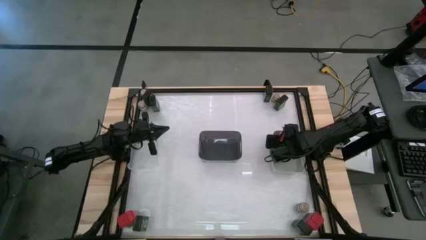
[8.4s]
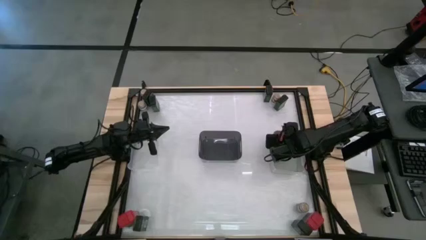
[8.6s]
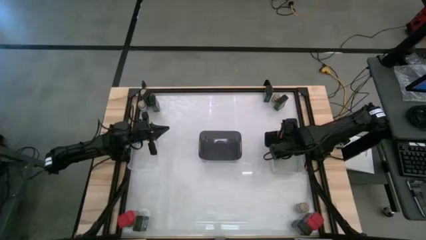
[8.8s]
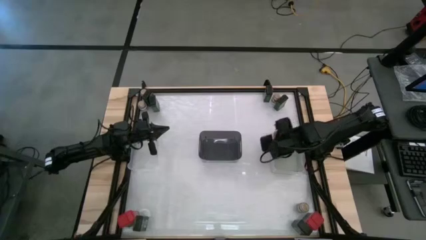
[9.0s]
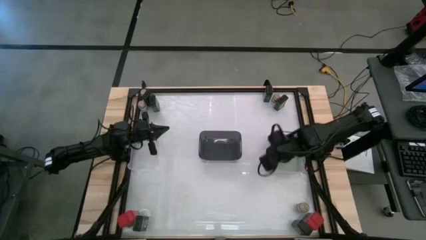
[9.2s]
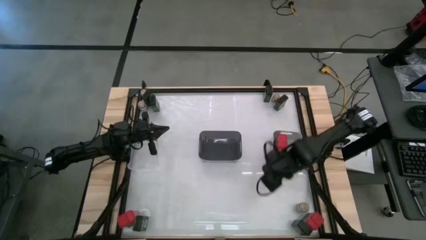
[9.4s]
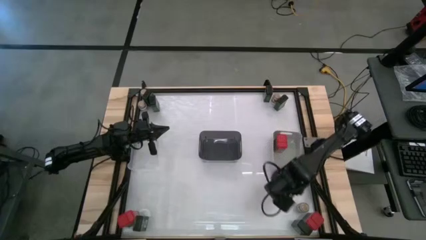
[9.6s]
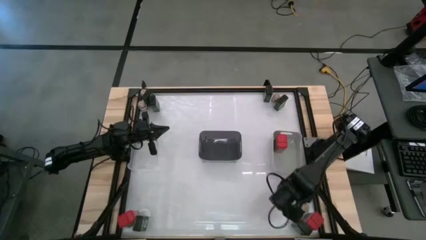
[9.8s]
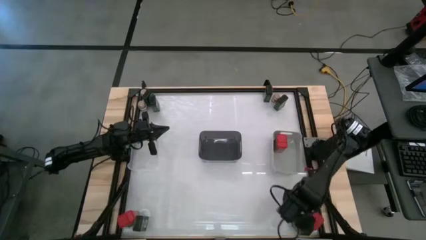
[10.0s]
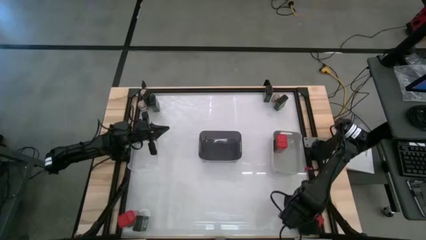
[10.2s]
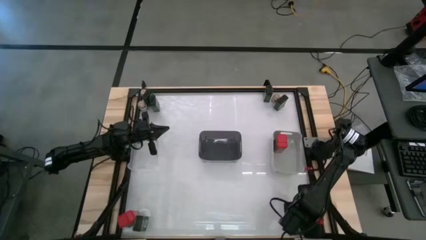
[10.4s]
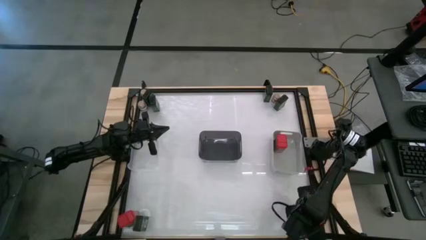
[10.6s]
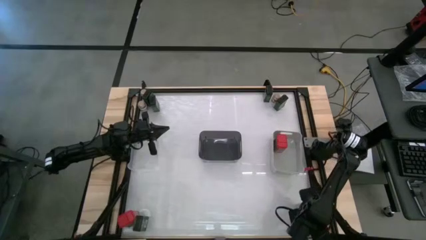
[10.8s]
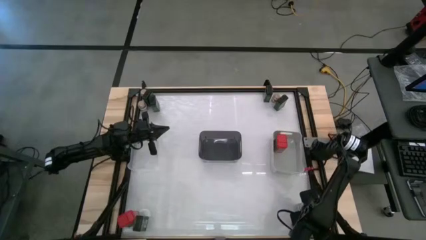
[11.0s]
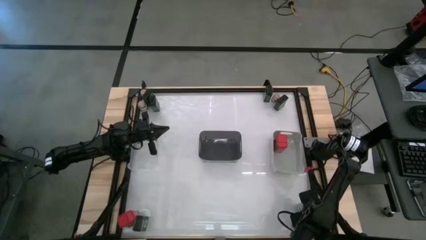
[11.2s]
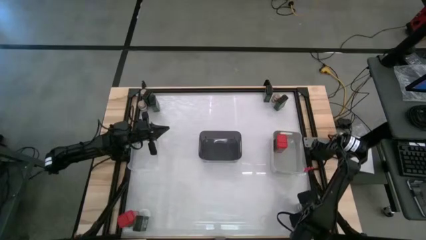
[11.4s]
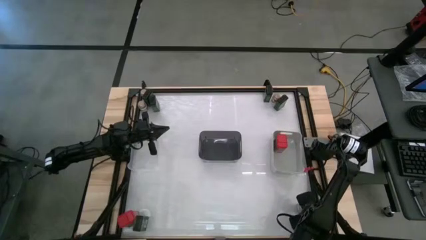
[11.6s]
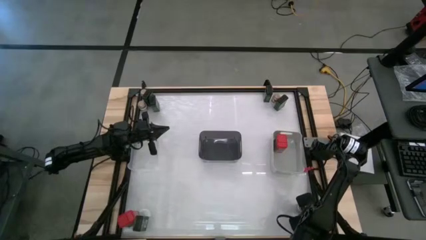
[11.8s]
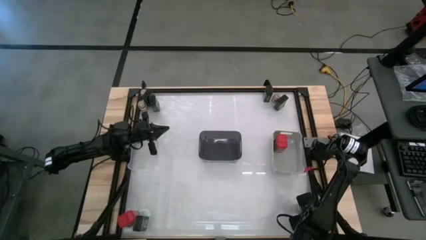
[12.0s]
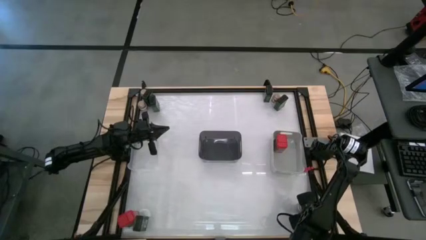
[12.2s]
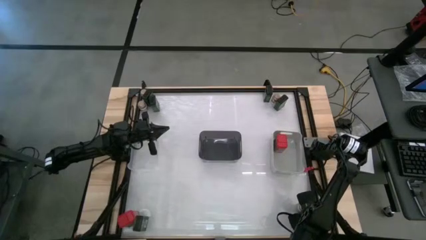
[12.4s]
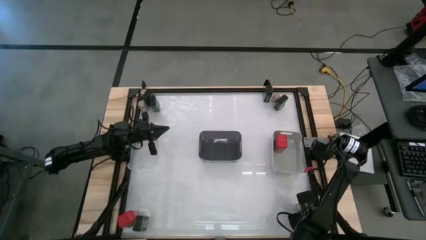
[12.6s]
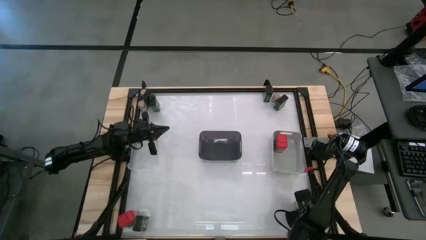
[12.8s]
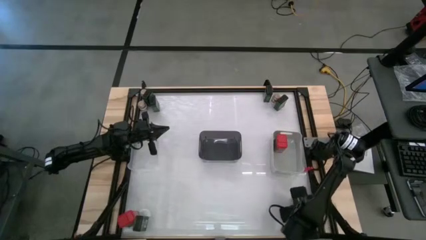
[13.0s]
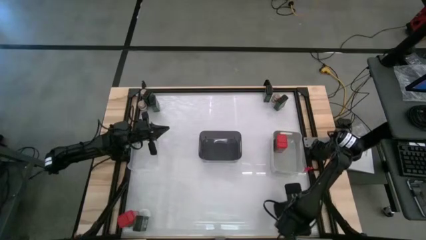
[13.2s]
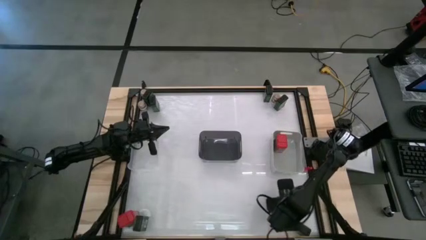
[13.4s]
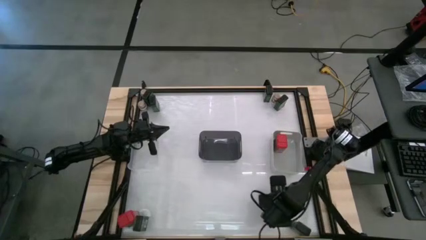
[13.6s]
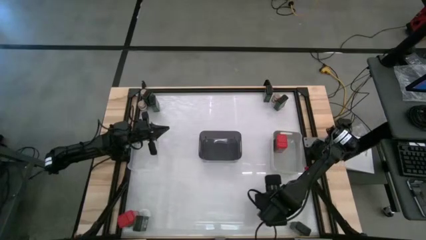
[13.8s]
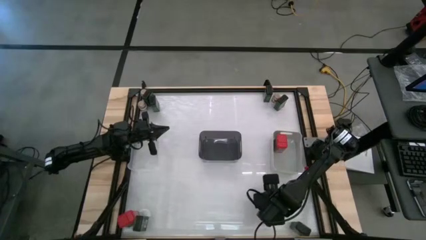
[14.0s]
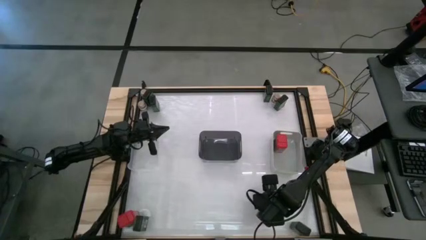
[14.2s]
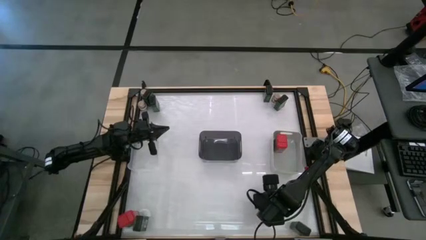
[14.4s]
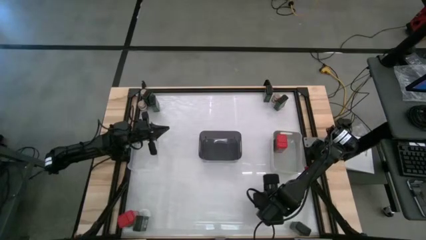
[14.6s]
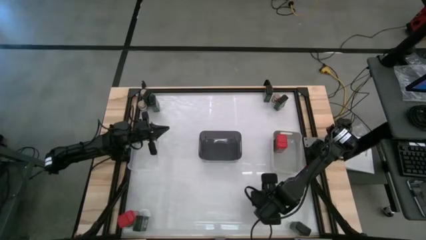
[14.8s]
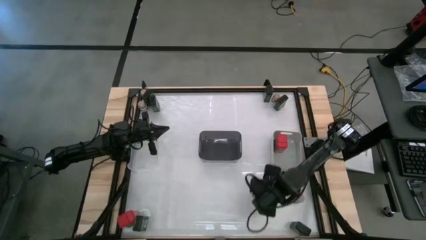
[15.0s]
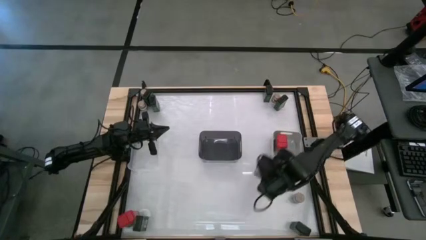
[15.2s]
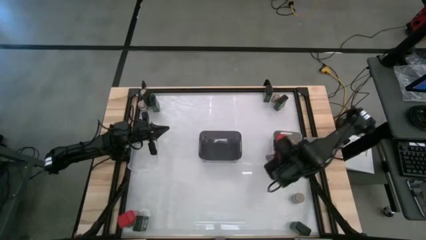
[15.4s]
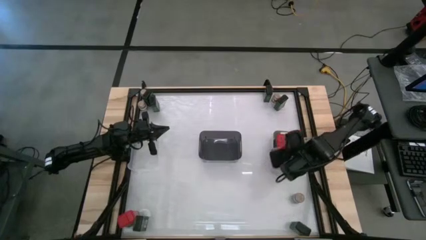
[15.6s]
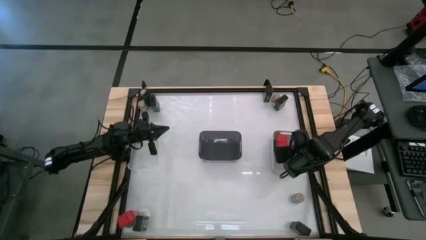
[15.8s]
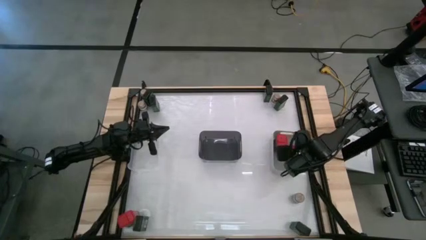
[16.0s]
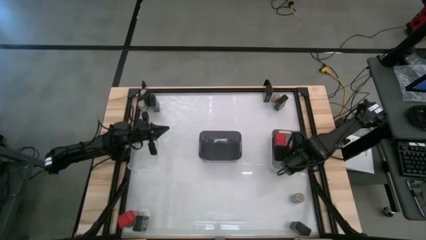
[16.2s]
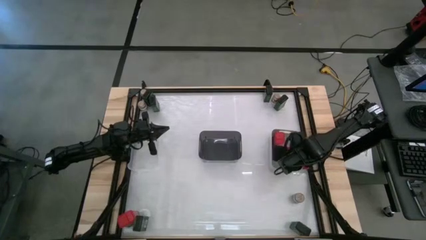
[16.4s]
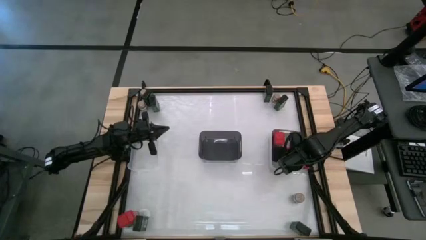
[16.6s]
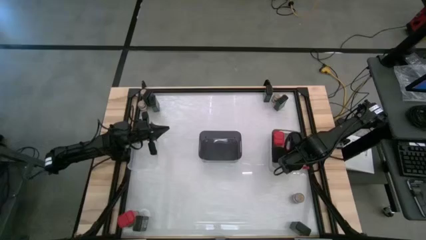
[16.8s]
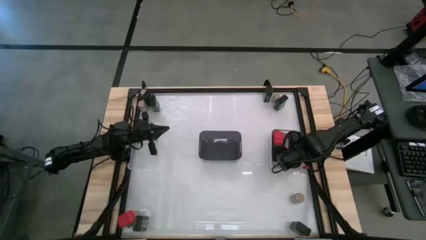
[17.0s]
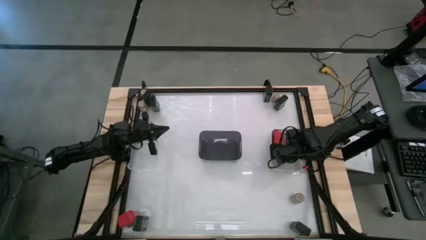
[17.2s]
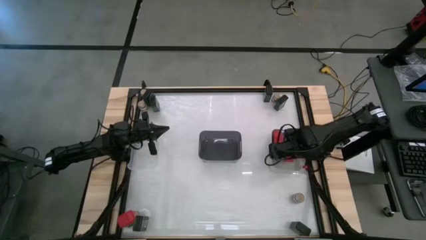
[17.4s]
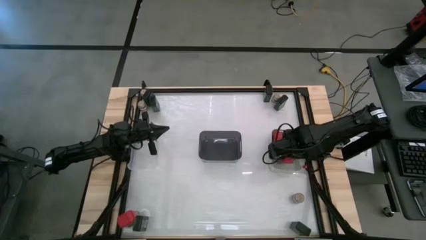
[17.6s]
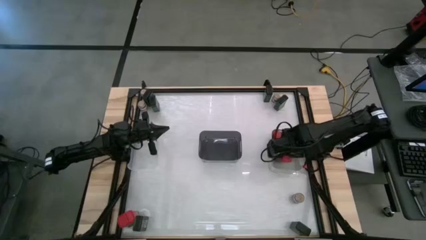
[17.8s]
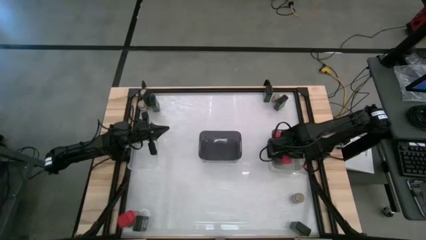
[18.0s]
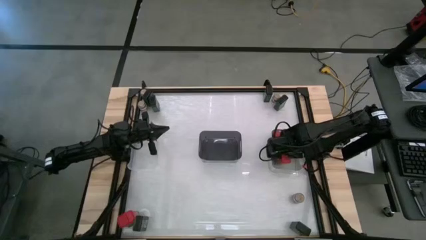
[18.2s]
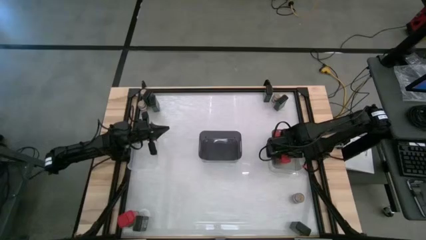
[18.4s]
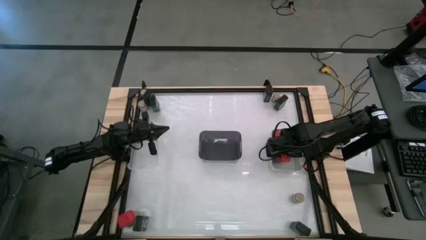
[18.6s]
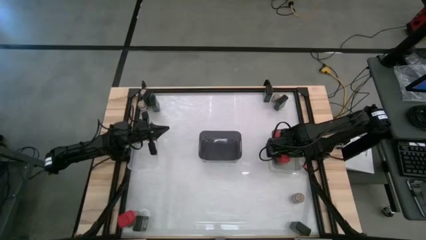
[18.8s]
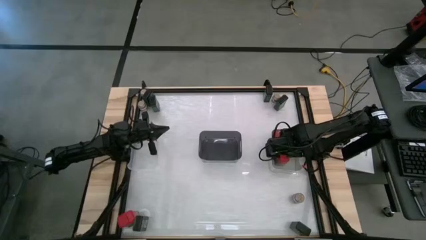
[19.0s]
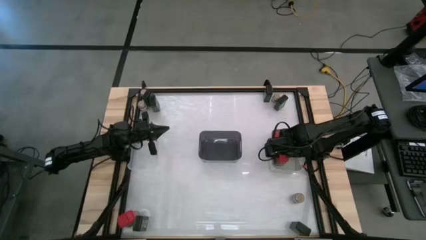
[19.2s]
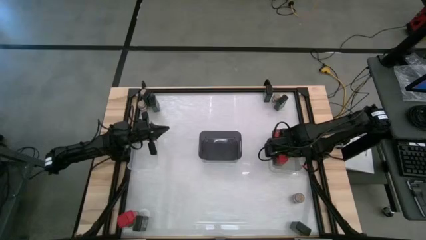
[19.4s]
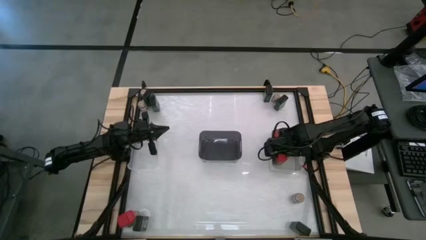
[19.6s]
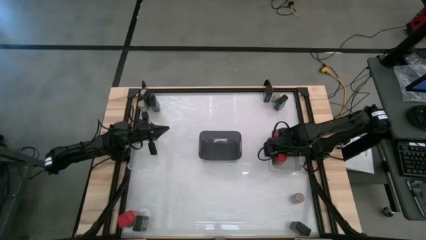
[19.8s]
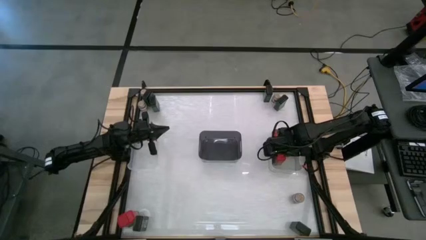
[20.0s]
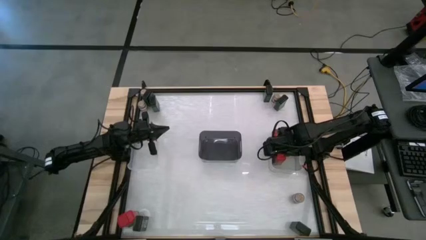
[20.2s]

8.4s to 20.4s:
Task: Sort spices by type
Put the red spice can into the white bin
